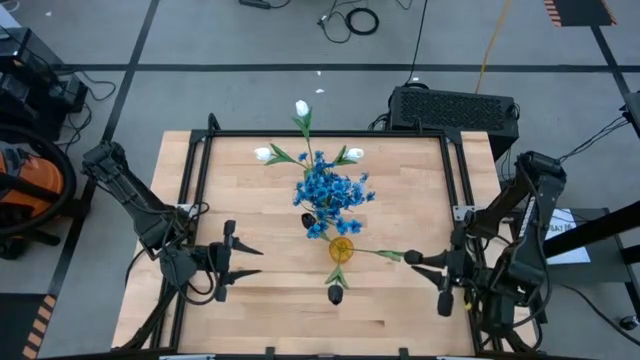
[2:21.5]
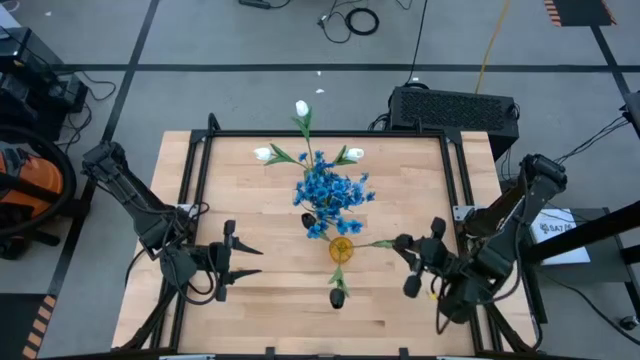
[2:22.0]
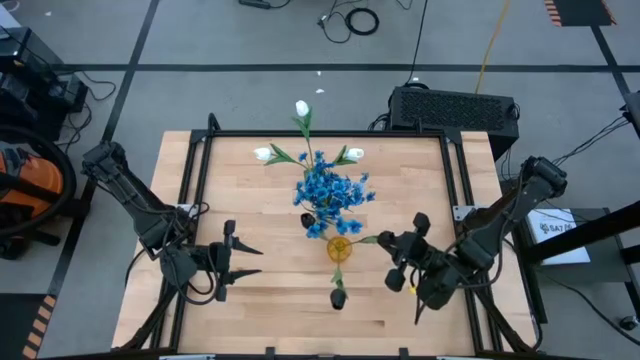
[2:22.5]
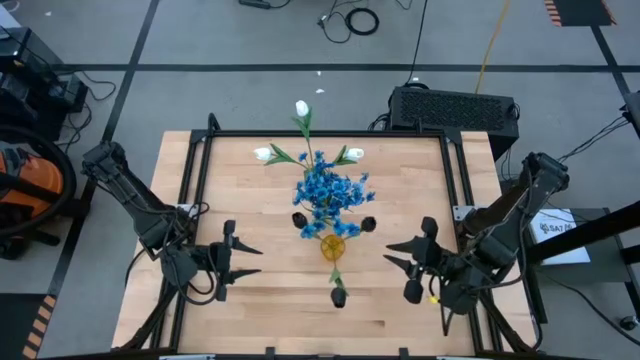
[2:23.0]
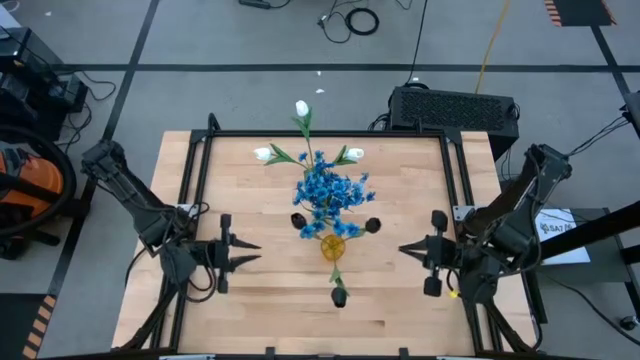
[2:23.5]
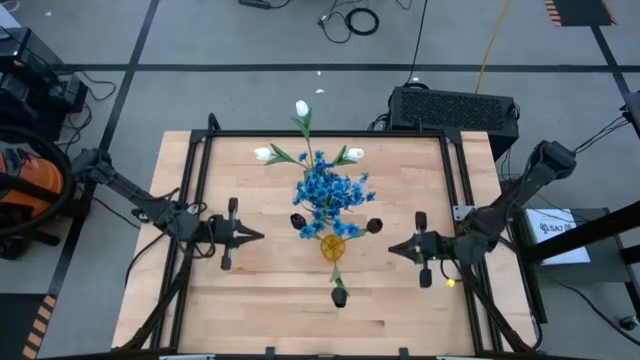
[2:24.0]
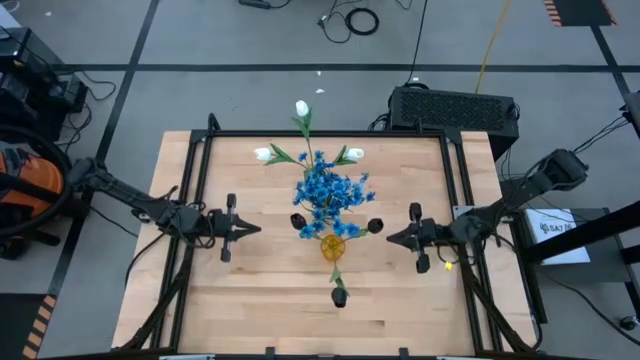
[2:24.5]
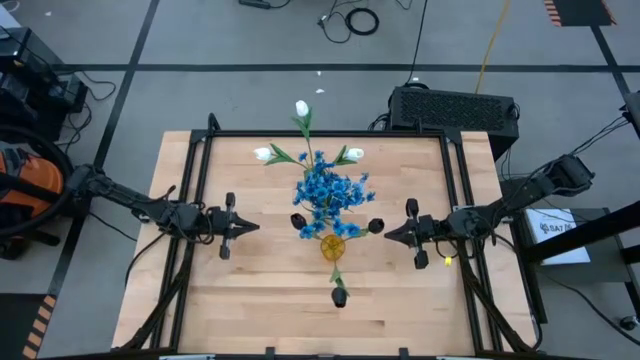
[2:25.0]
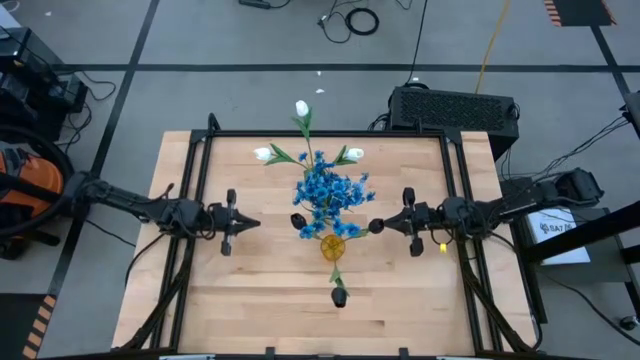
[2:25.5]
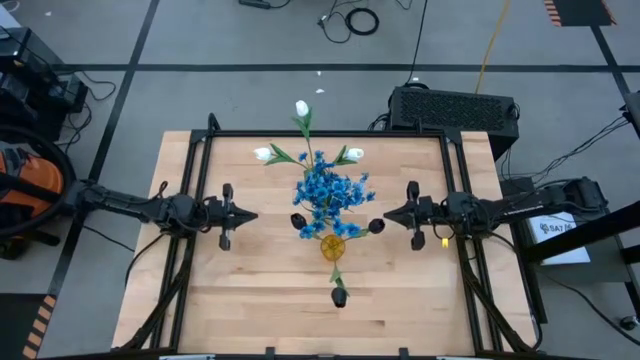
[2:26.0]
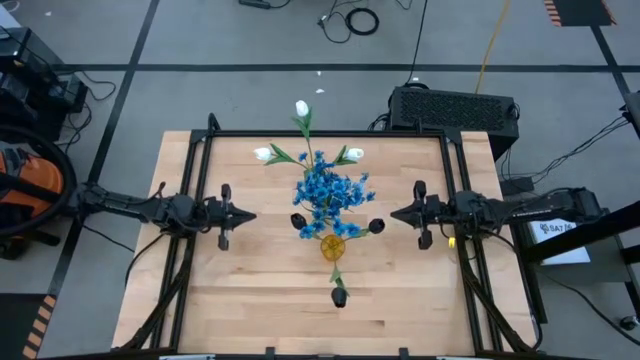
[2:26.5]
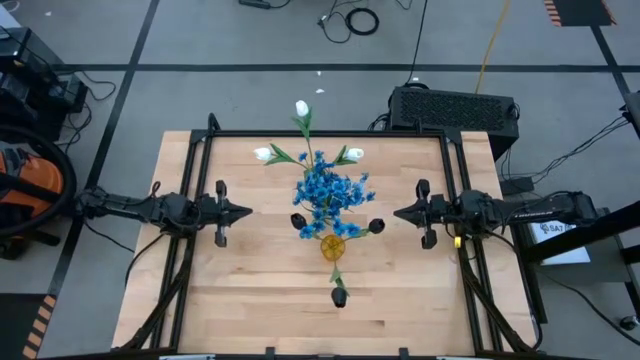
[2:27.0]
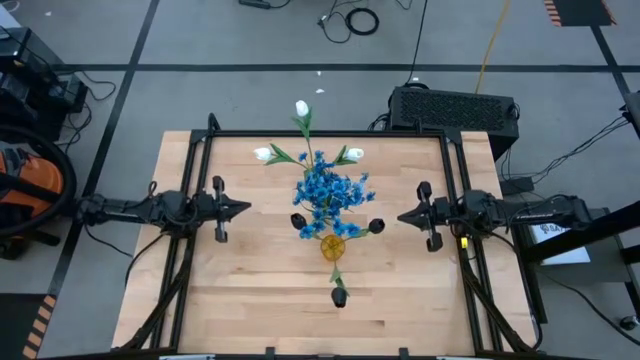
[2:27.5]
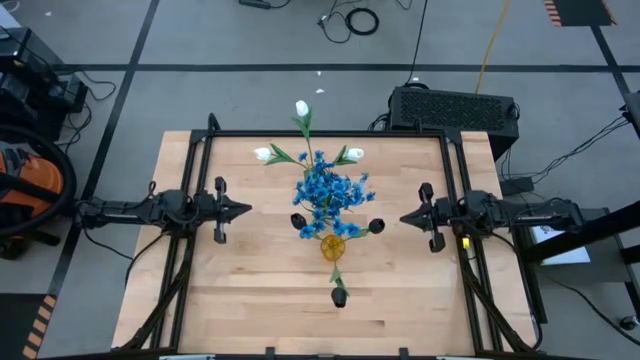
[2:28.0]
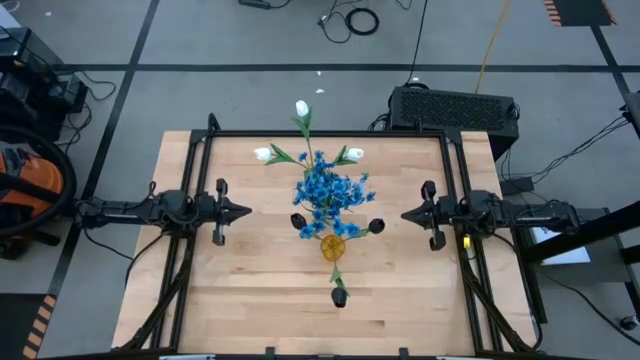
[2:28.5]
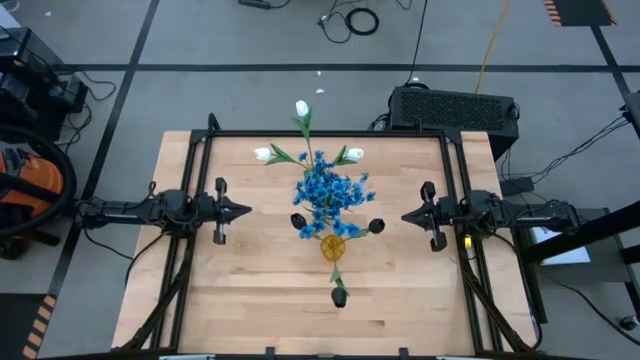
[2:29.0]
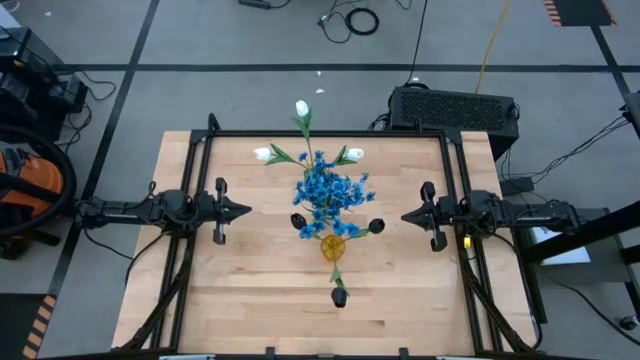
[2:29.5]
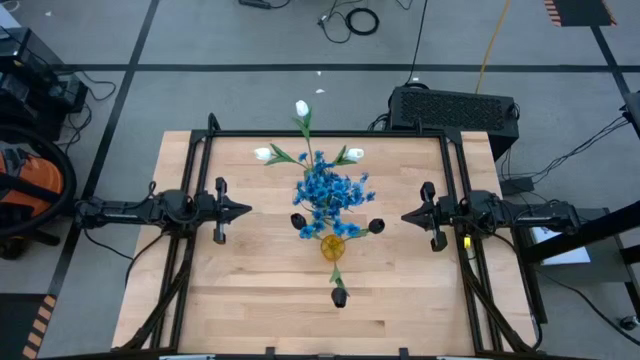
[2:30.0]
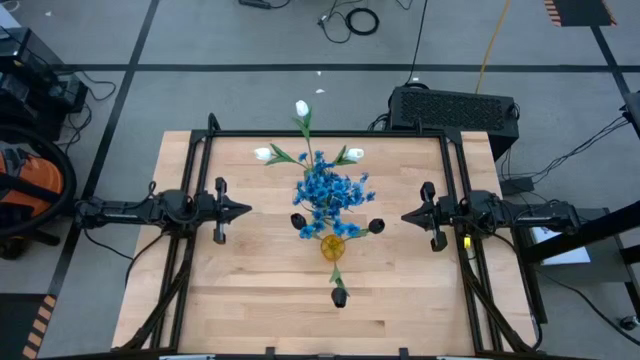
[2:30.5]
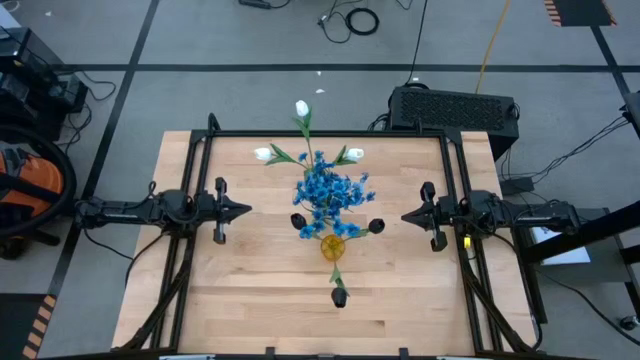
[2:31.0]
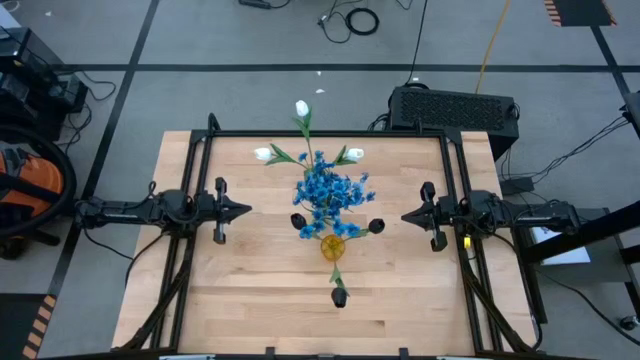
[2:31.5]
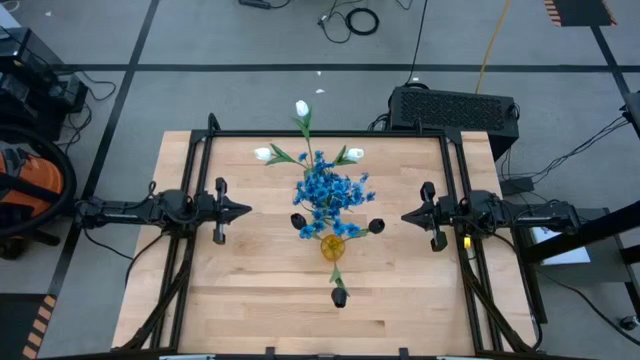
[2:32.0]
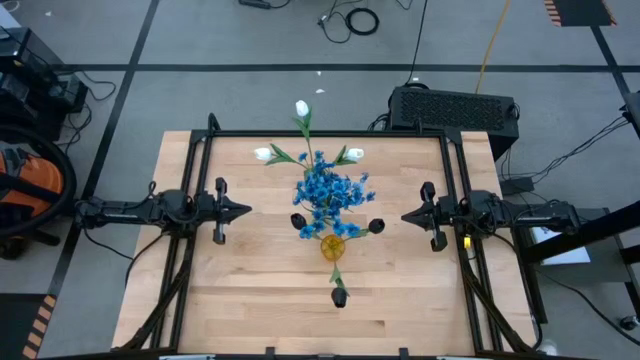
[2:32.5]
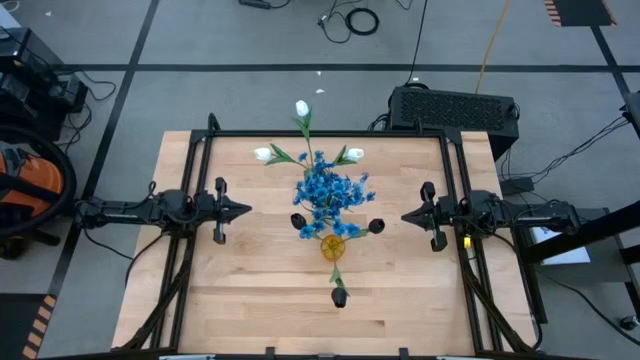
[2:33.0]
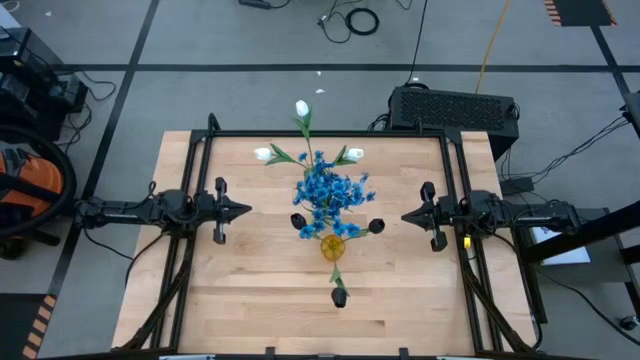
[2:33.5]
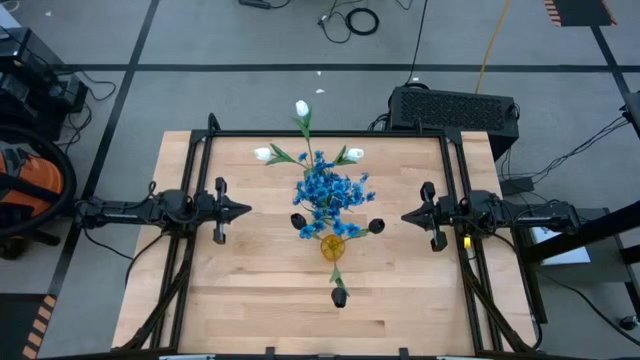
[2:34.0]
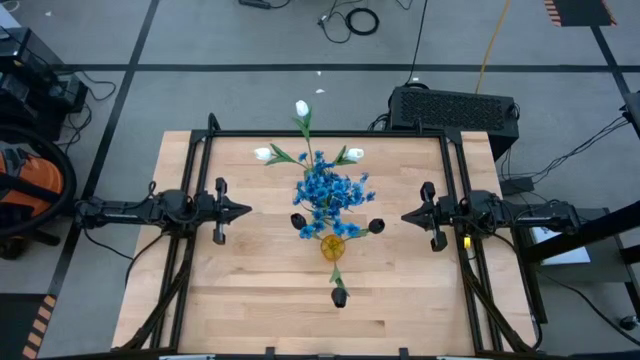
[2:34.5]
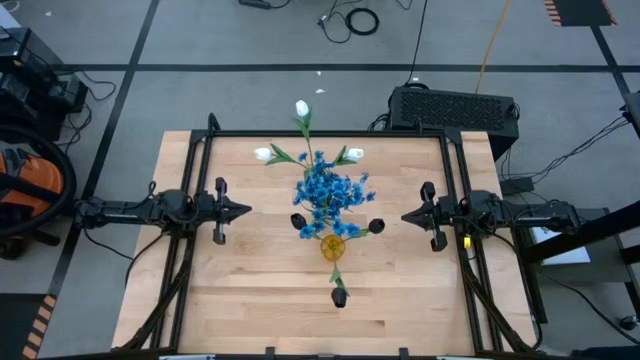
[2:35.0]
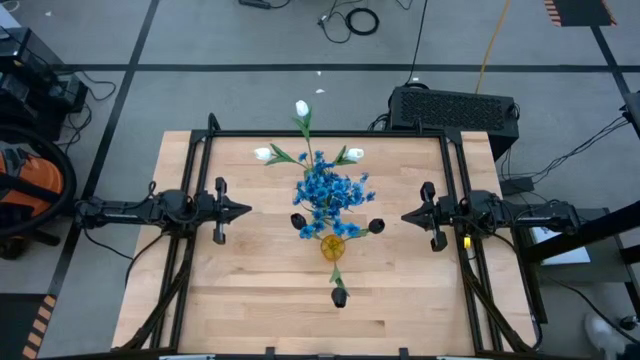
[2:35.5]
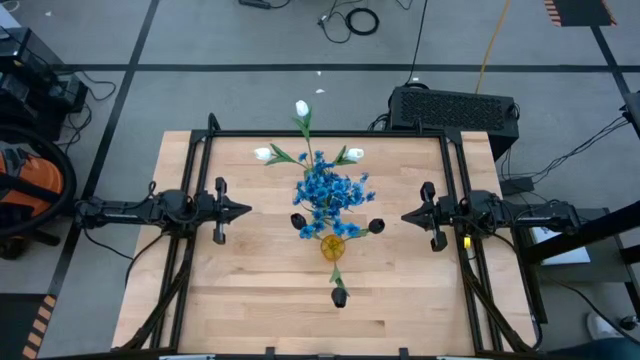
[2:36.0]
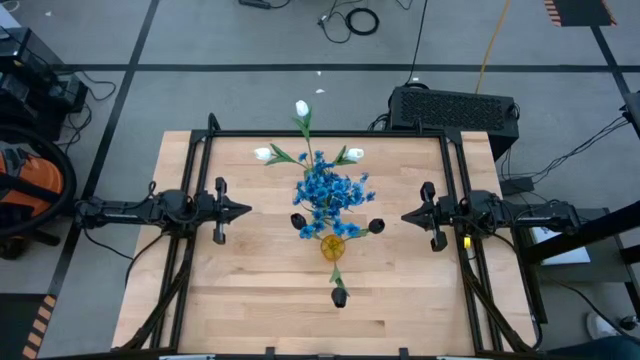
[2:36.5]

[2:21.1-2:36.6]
Task: Sort flowers into vase by color
Return to Home Position

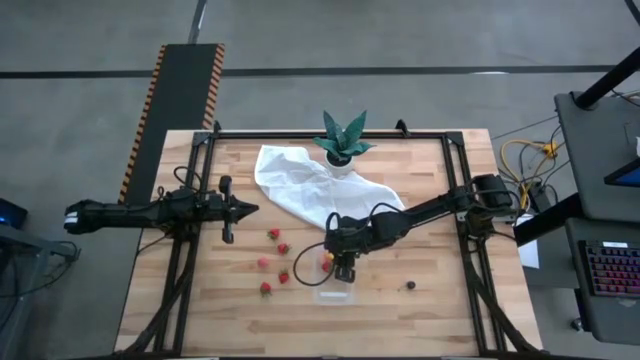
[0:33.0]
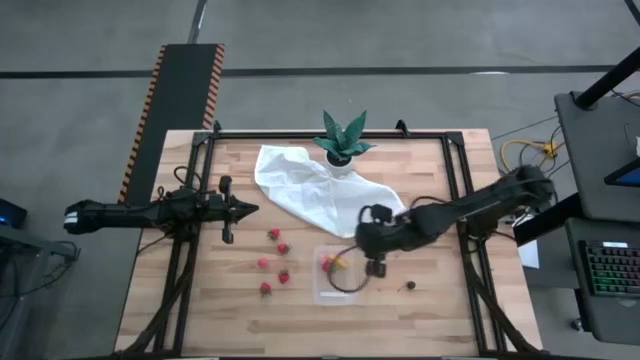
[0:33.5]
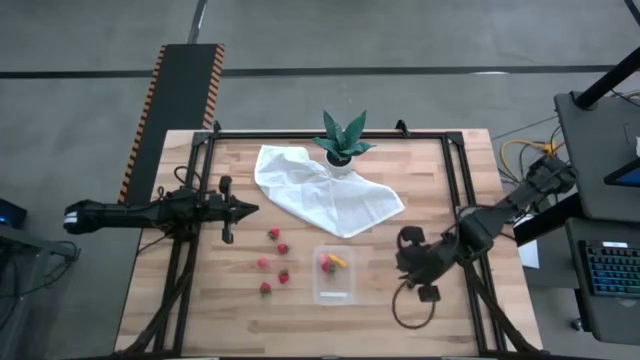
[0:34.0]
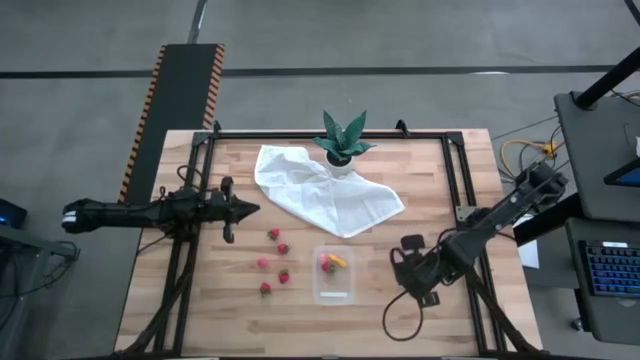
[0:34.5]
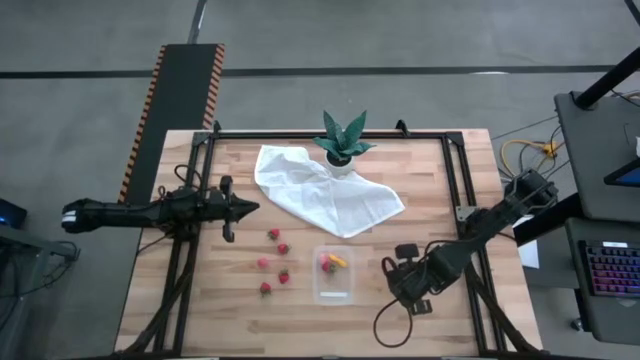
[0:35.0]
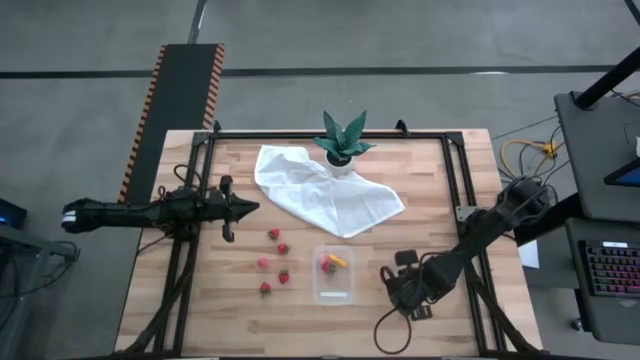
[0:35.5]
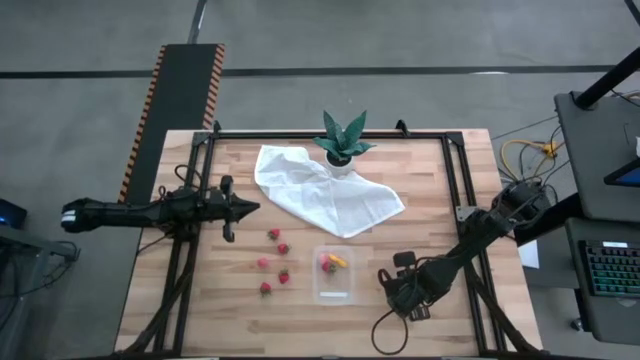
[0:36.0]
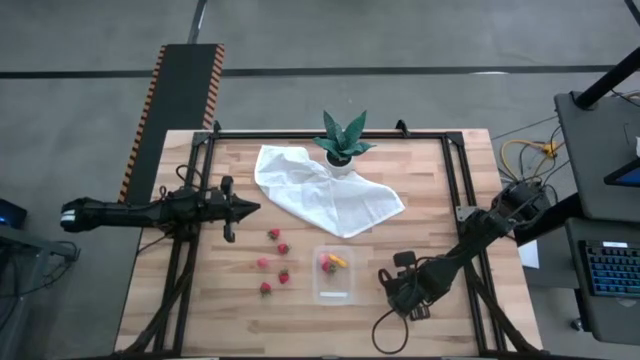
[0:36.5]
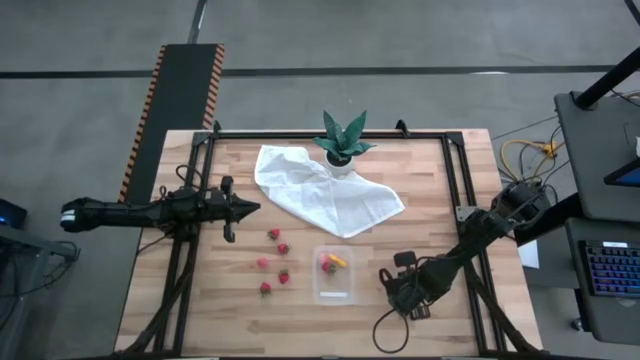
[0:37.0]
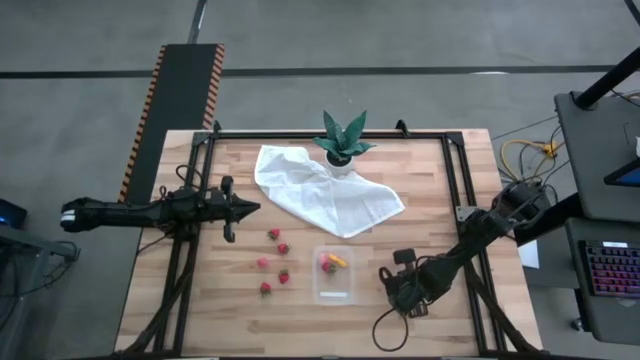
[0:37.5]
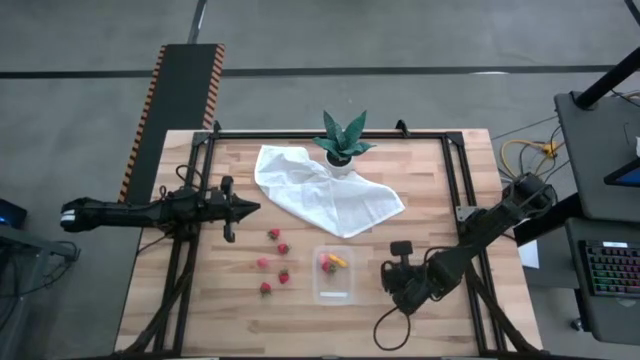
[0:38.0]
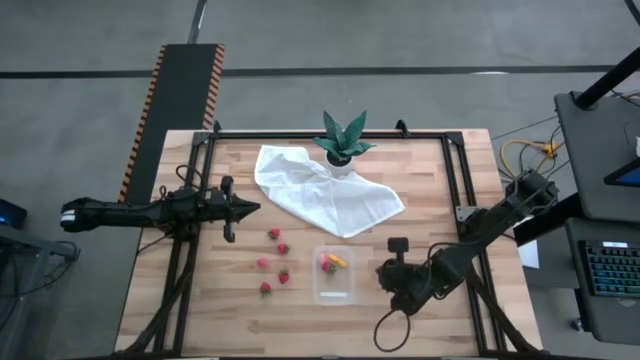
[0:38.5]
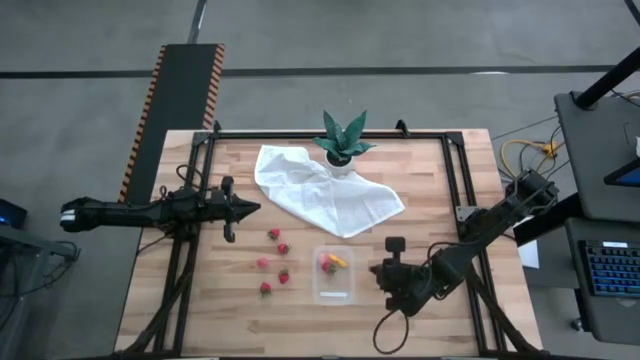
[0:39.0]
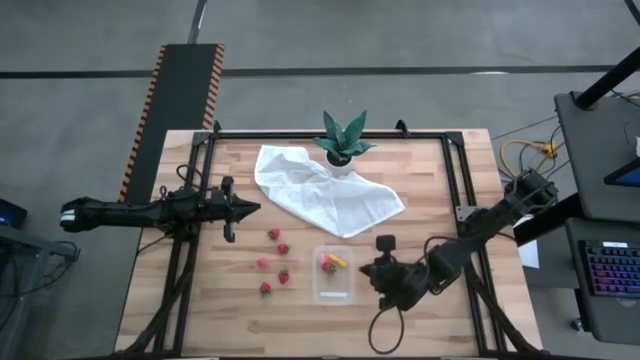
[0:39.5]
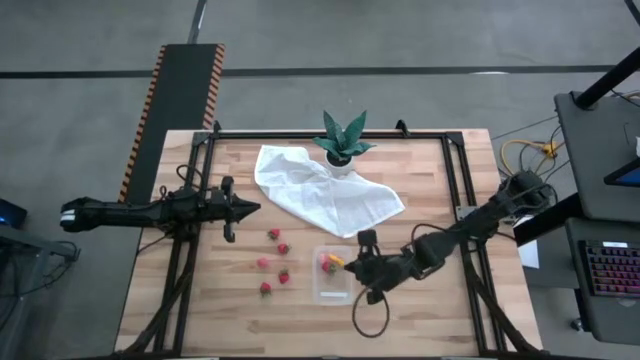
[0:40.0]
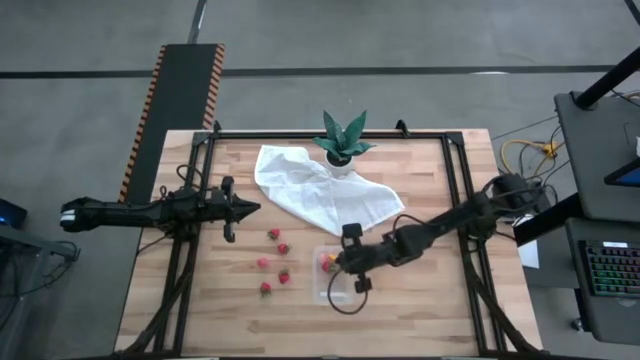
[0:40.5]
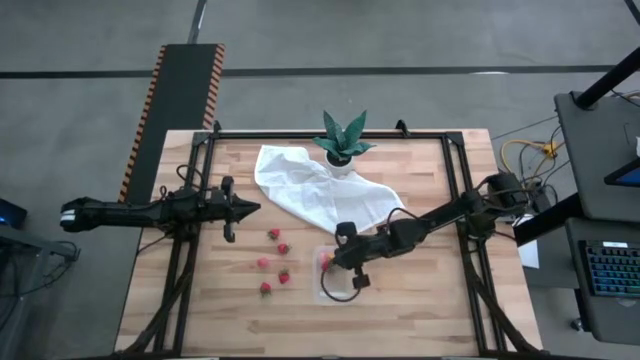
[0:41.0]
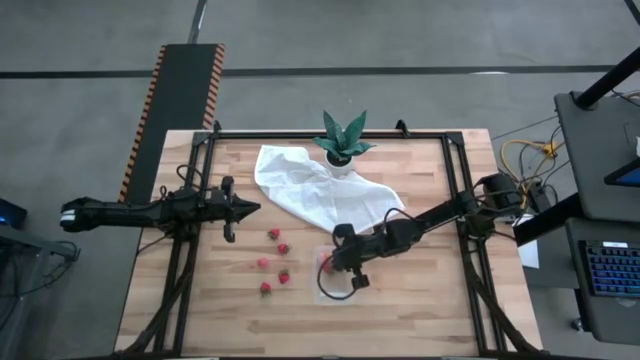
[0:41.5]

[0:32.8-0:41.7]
Task: Pick and placing Produce into tupperware
Put the black cherry into the transparent bin
